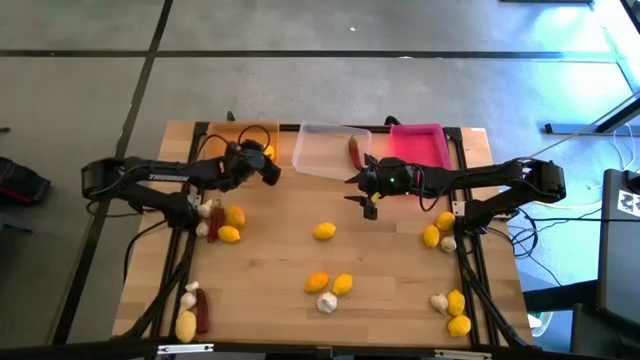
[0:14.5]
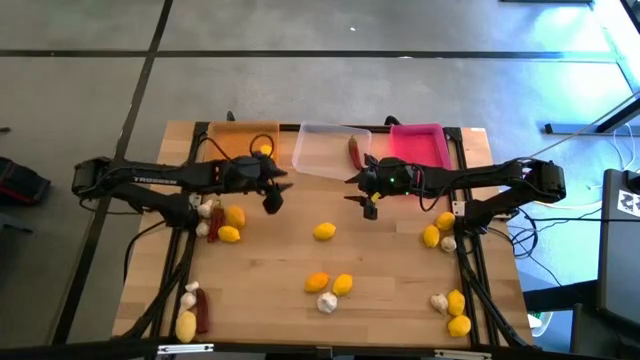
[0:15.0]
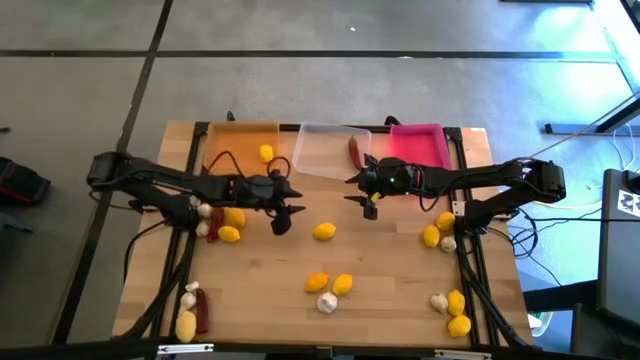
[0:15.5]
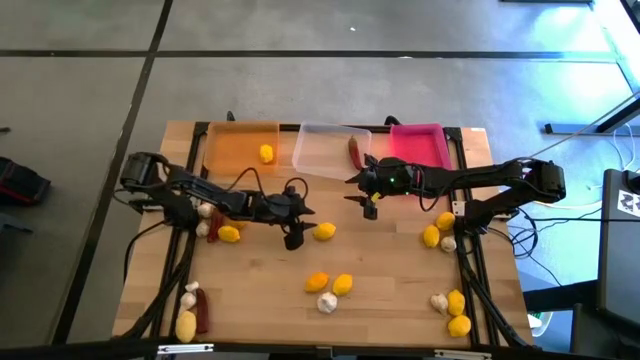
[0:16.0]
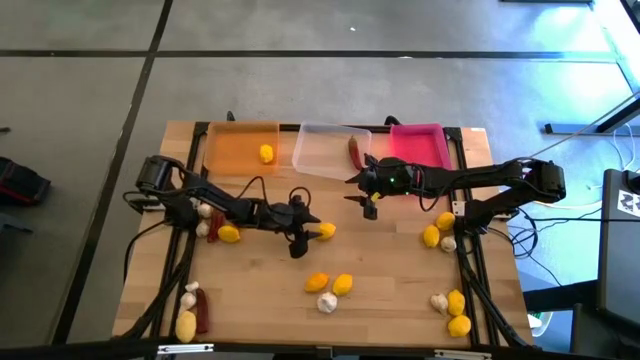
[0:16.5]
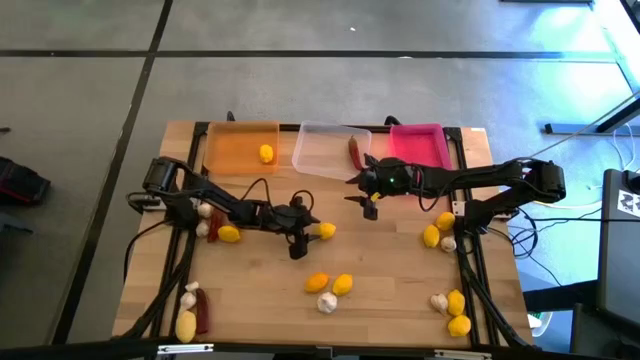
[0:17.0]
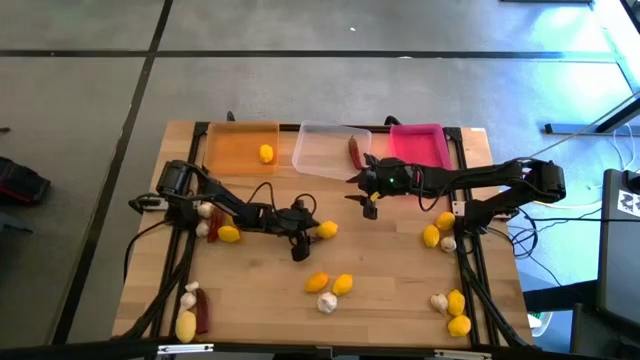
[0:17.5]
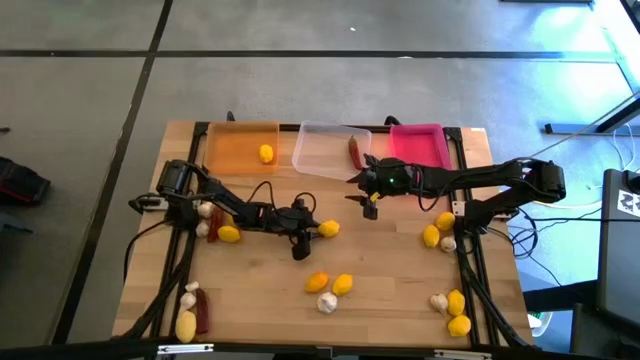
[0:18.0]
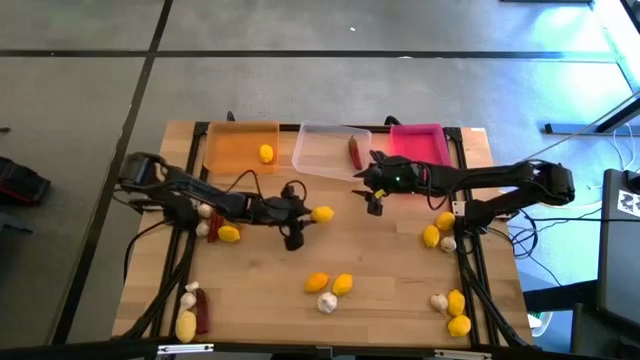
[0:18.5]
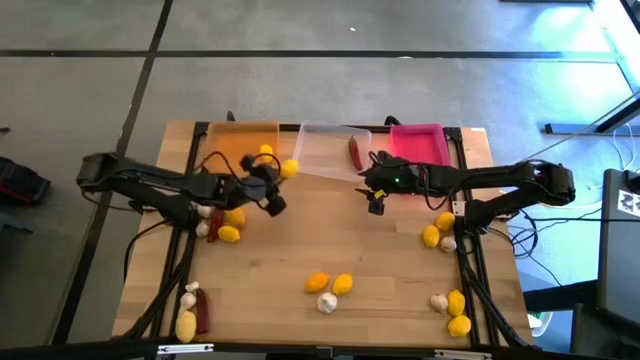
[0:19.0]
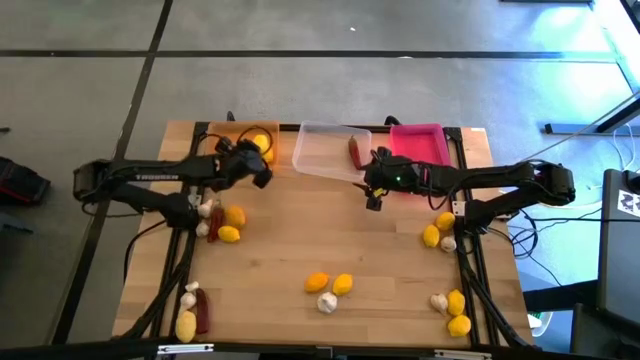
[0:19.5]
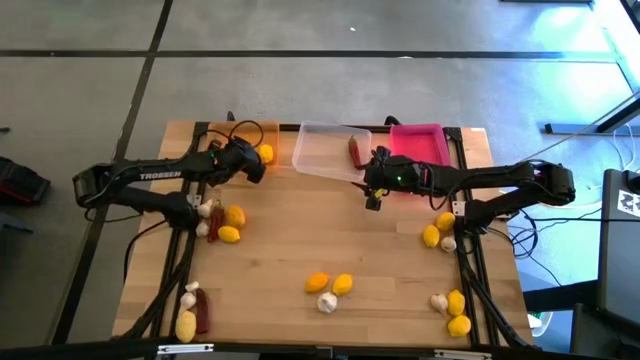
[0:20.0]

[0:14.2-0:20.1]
Task: Sort produce into baskets
Put the yellow lemon into the orange bin

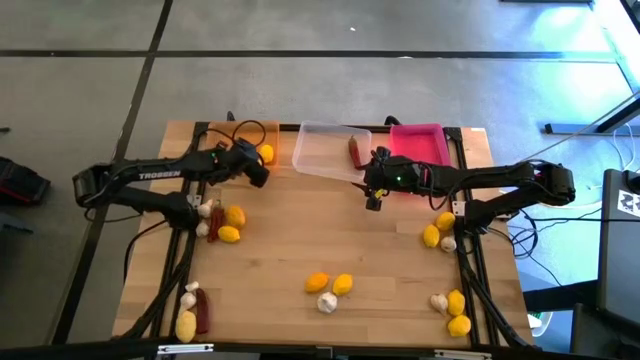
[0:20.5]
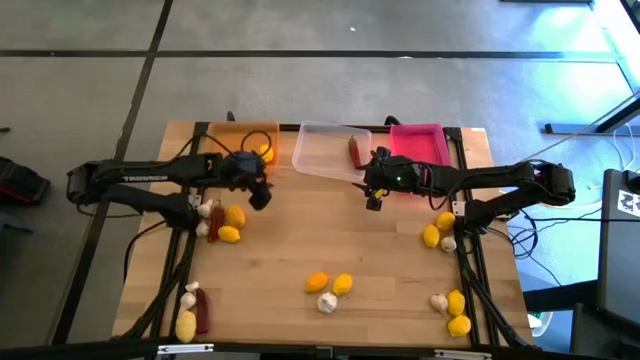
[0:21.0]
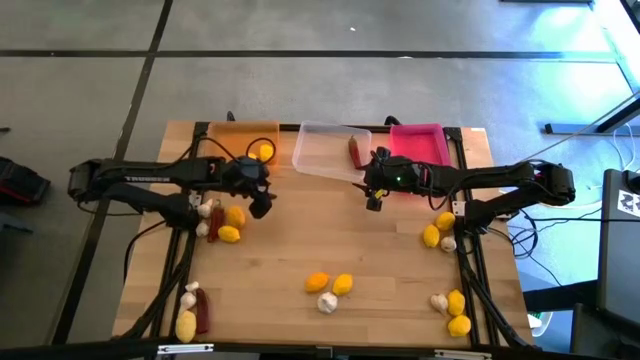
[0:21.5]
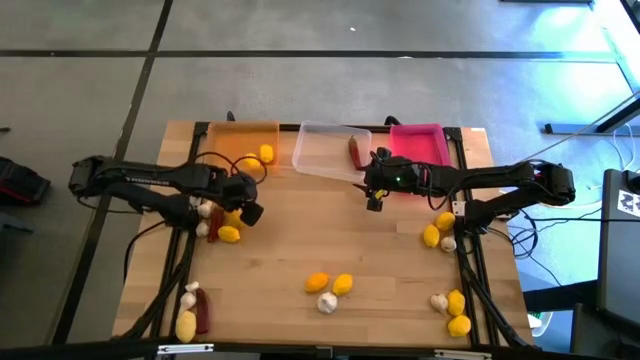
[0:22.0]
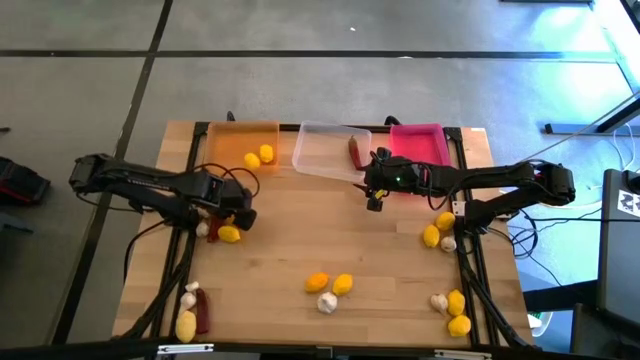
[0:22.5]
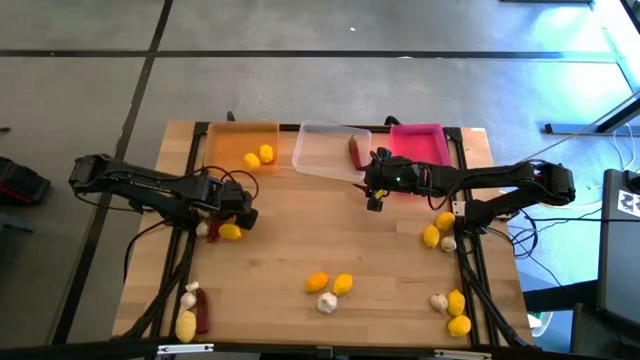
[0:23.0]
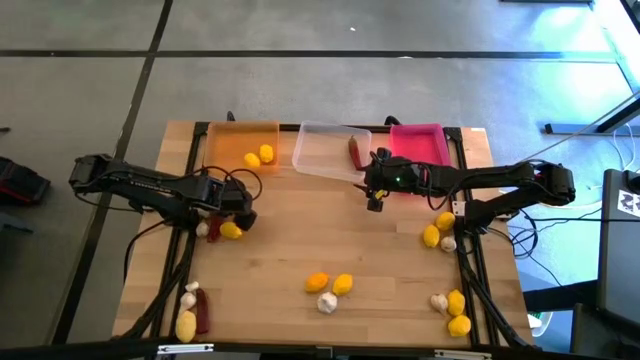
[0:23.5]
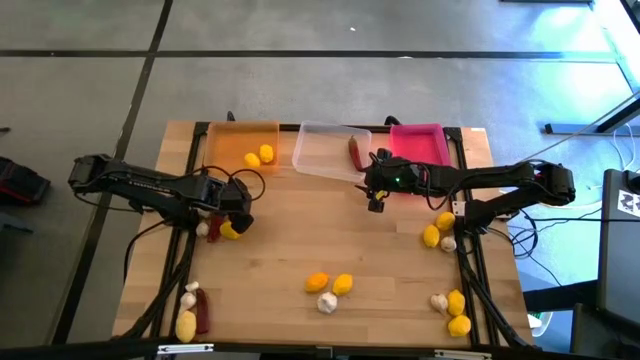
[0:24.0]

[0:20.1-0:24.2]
Put the yellow lemon into the orange bin

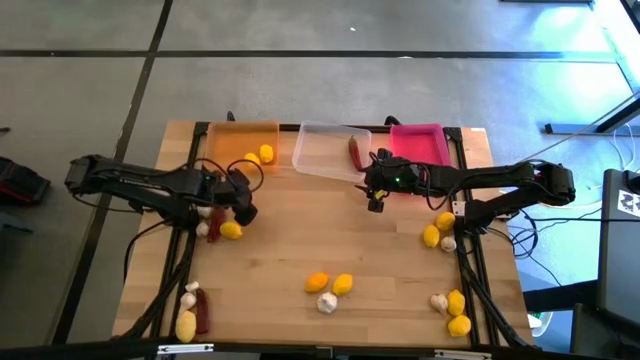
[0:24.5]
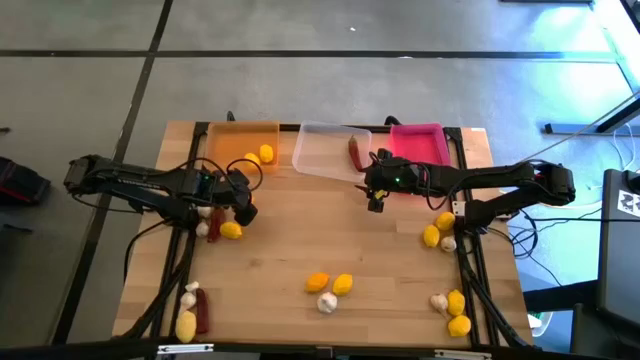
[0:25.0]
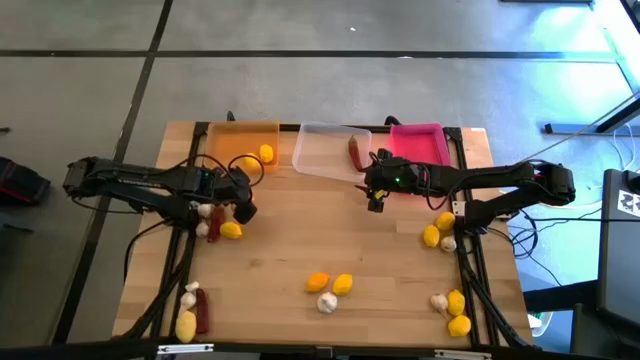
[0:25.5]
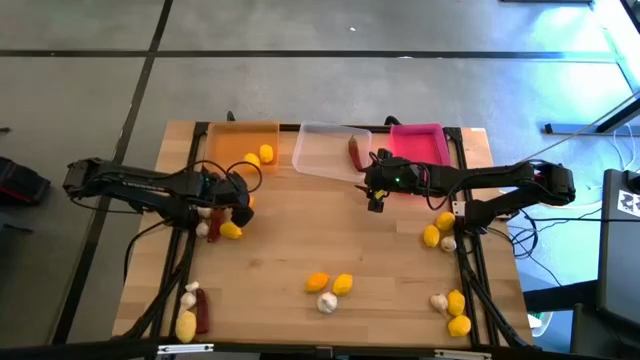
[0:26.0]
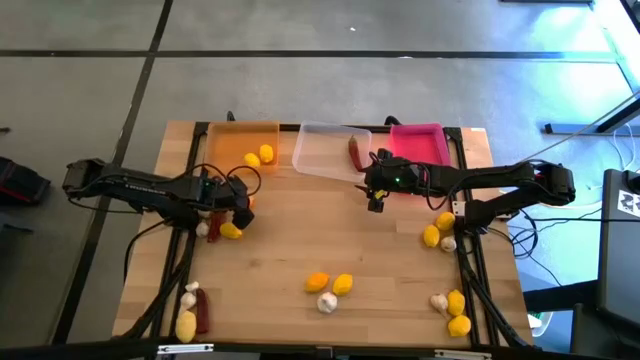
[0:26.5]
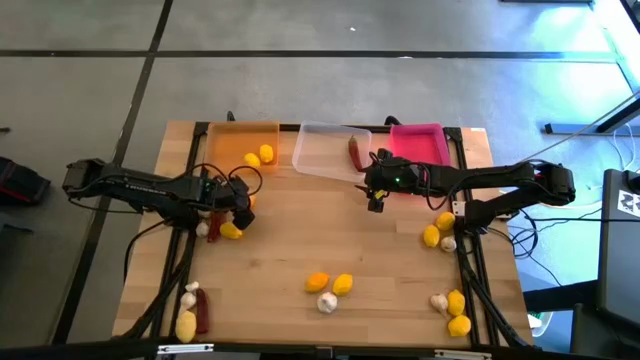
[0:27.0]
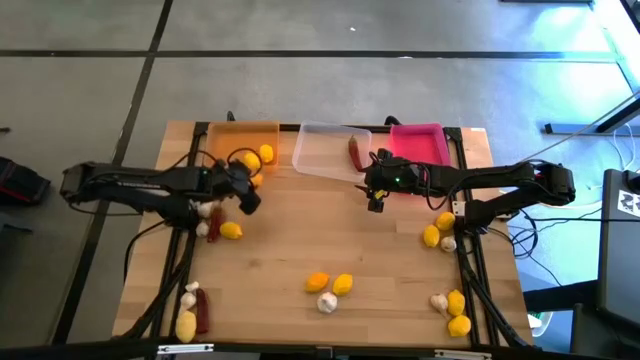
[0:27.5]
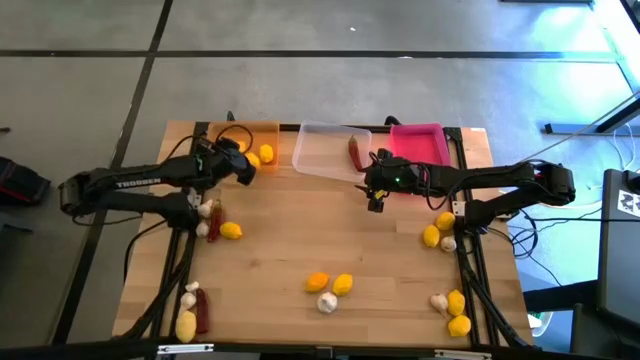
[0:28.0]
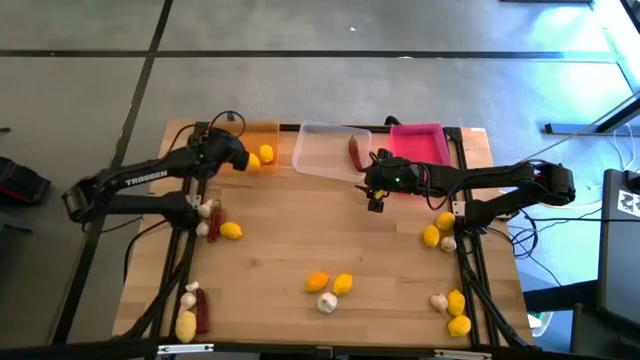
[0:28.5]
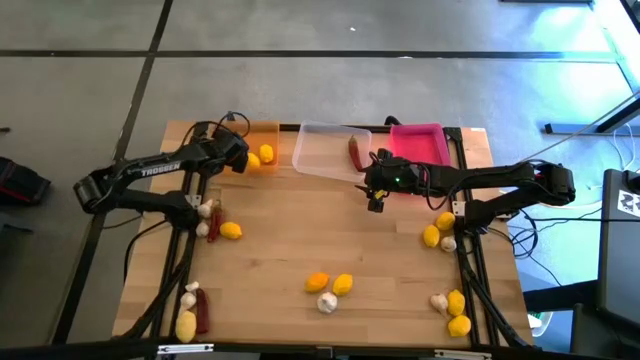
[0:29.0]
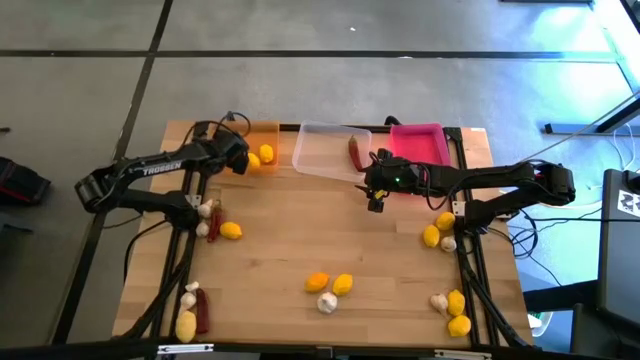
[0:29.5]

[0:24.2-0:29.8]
Put the yellow lemon into the orange bin

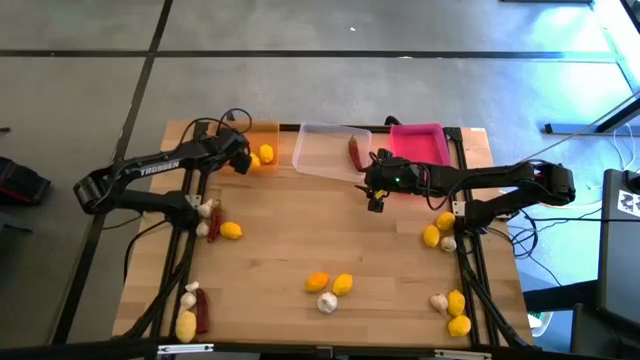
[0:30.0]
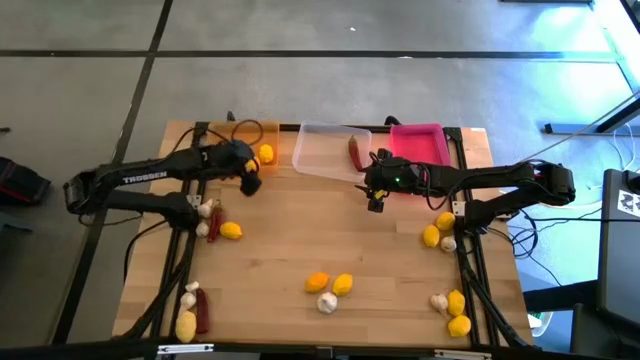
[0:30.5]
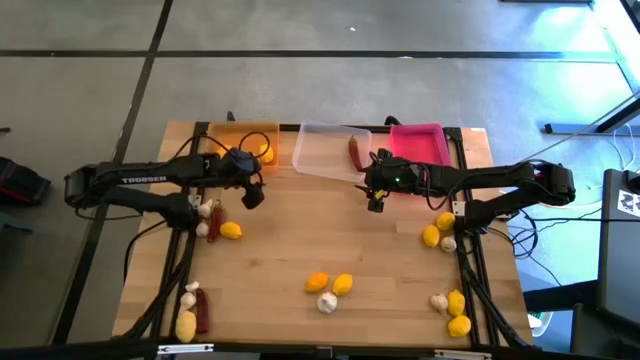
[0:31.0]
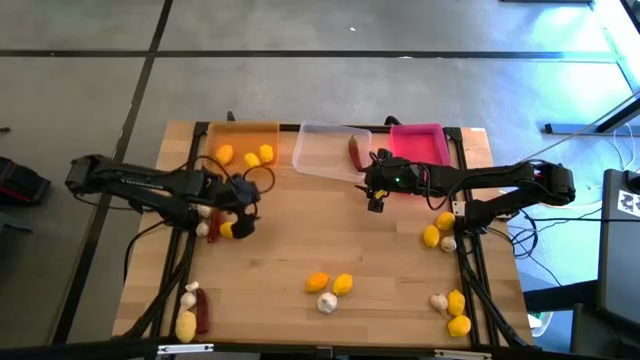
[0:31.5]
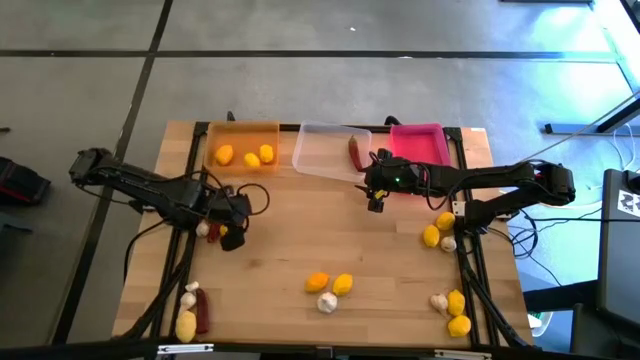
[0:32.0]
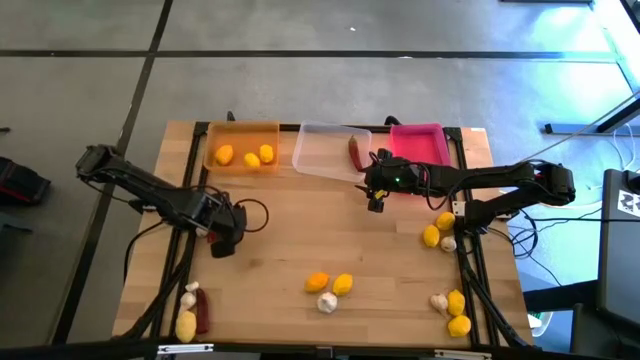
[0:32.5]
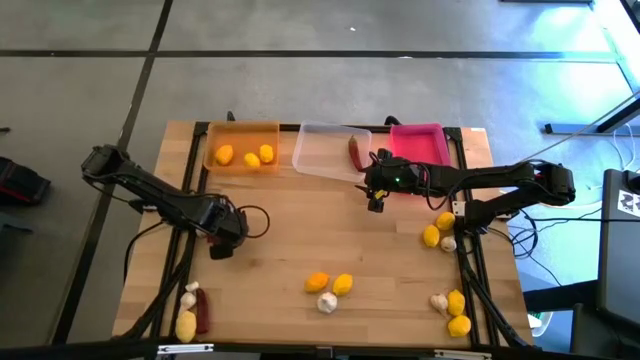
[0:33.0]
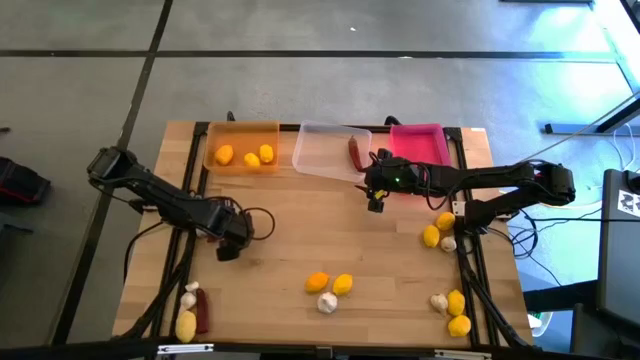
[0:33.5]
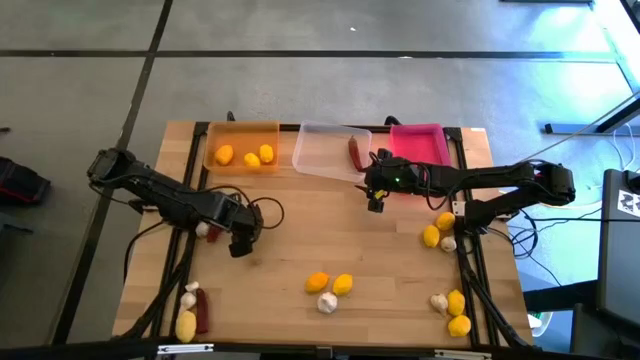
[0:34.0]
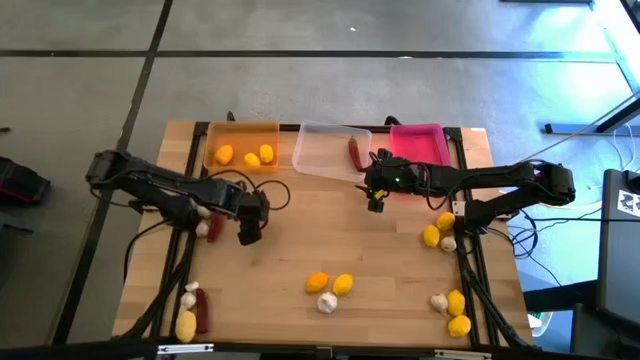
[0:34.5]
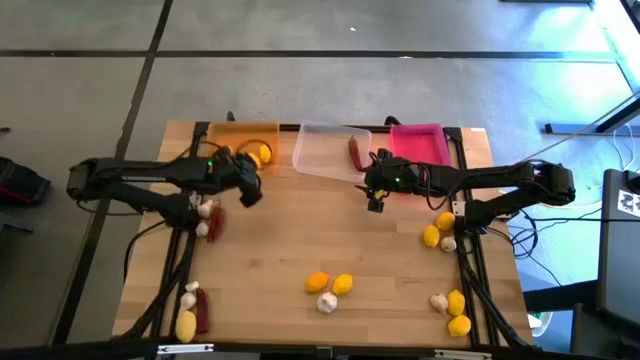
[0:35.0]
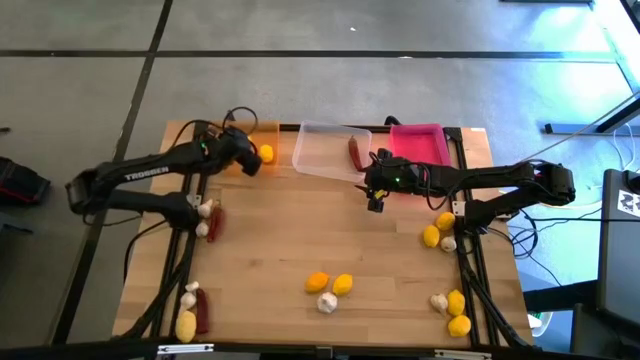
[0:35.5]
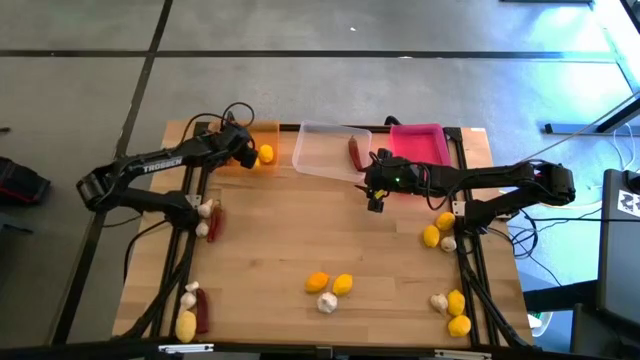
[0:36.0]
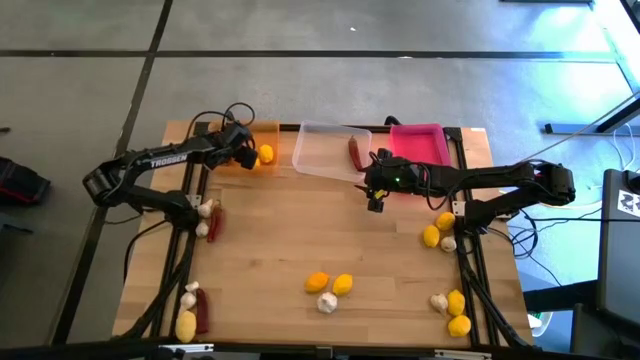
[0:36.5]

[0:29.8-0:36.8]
Put the yellow lemon into the orange bin
